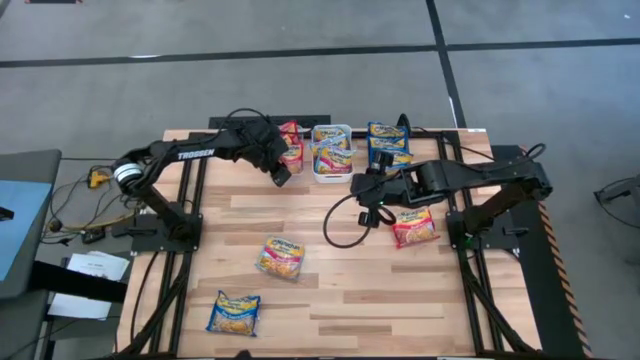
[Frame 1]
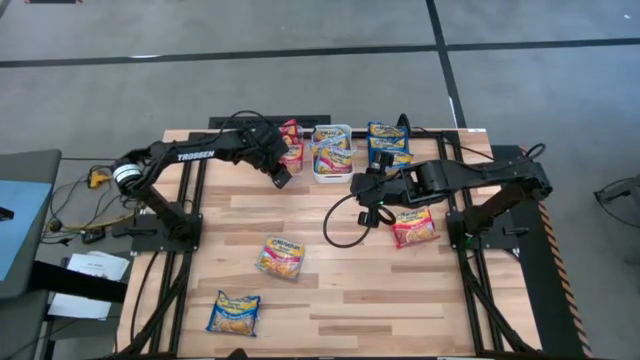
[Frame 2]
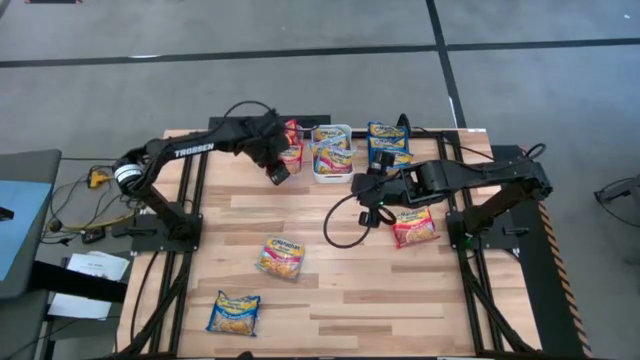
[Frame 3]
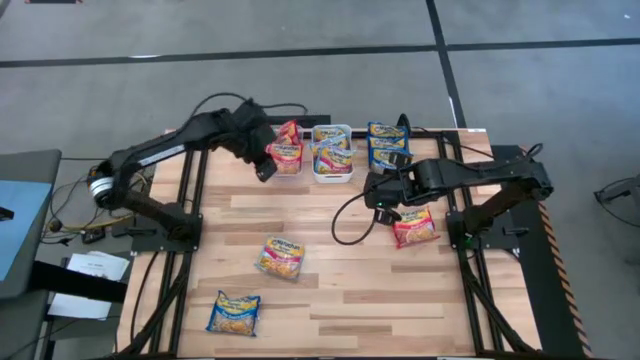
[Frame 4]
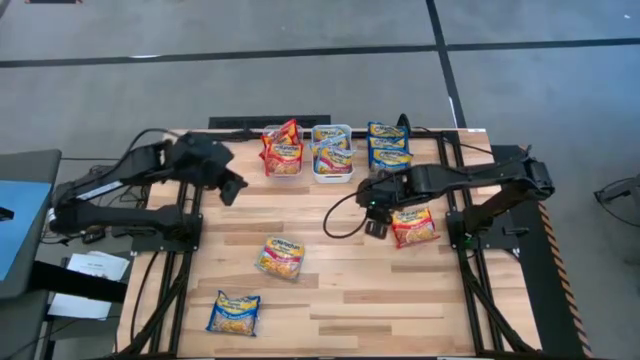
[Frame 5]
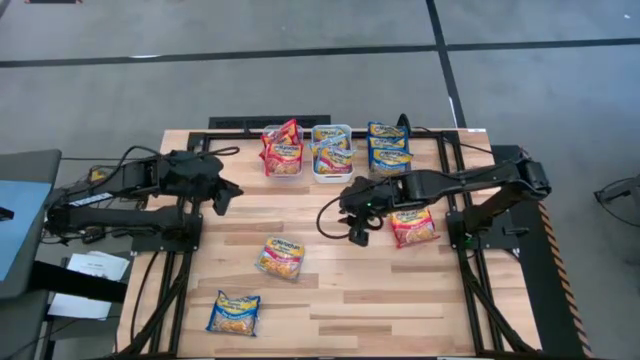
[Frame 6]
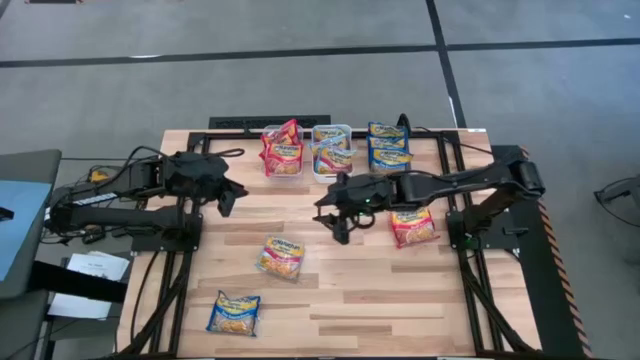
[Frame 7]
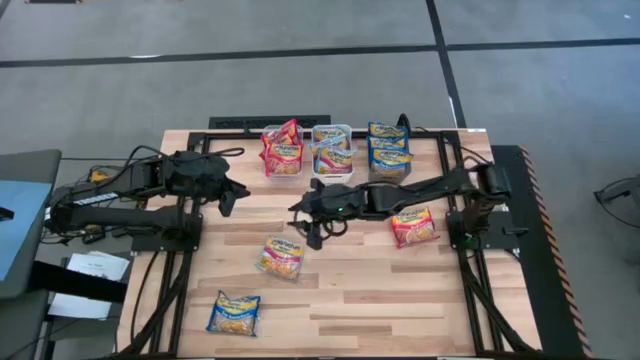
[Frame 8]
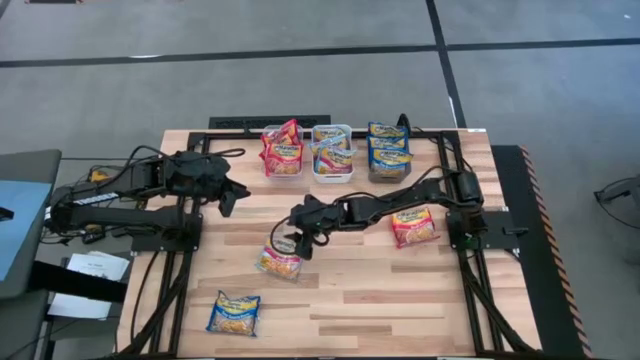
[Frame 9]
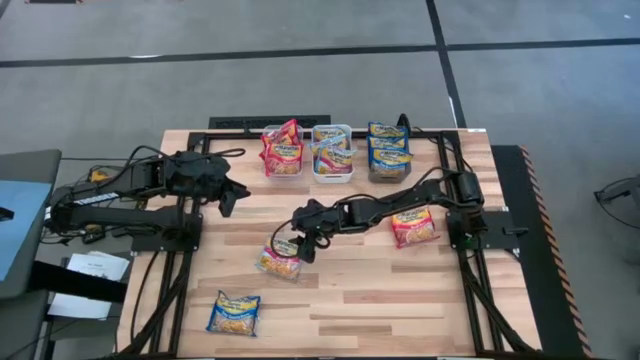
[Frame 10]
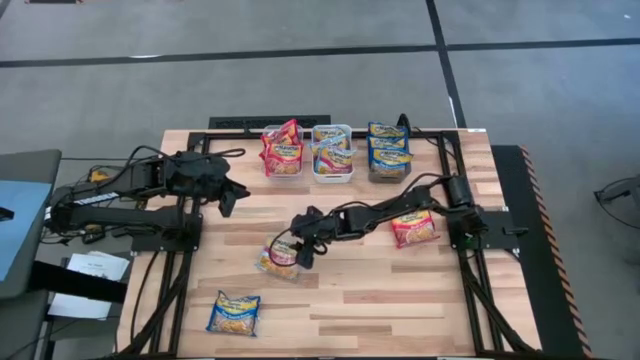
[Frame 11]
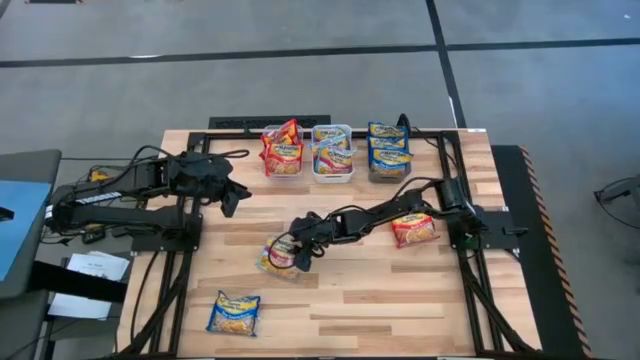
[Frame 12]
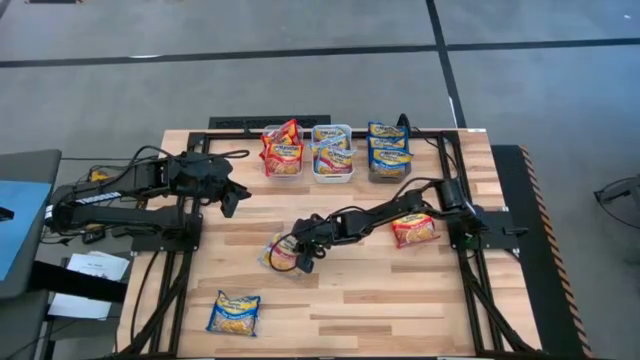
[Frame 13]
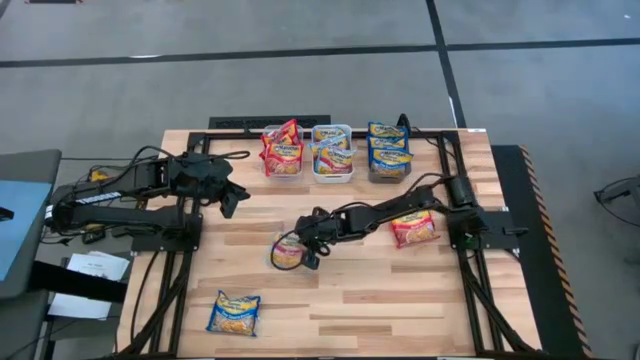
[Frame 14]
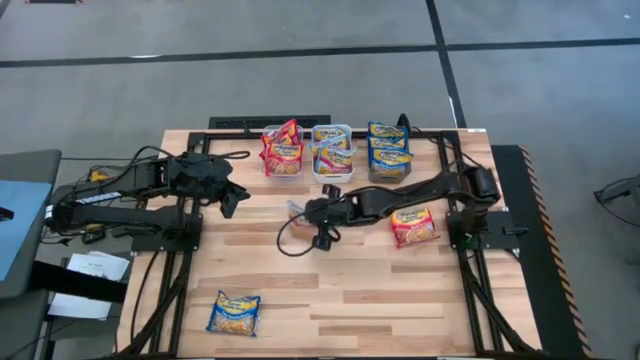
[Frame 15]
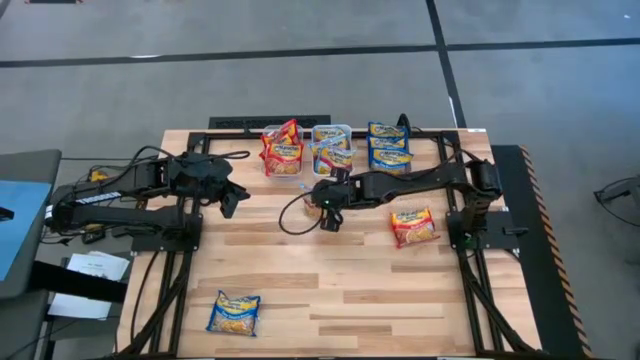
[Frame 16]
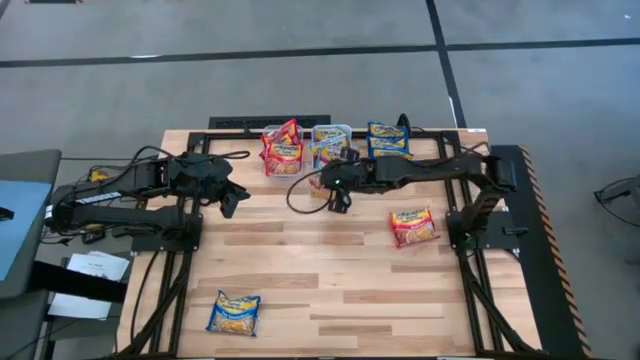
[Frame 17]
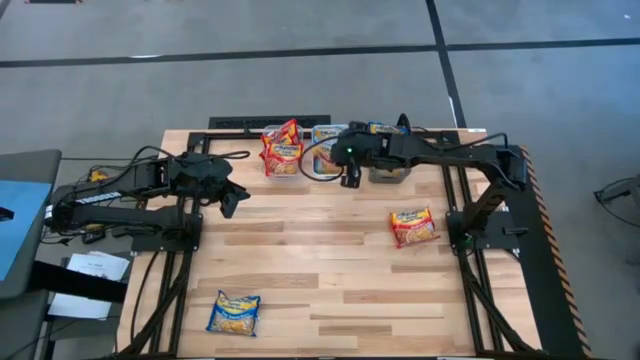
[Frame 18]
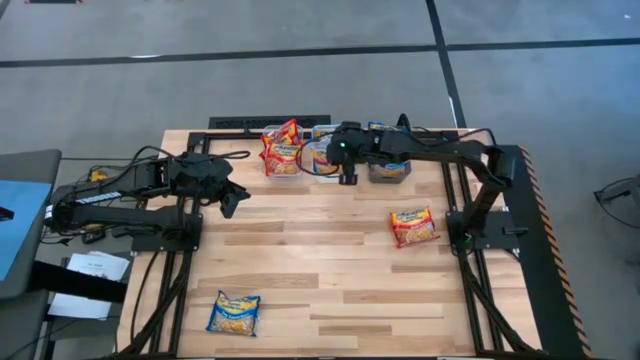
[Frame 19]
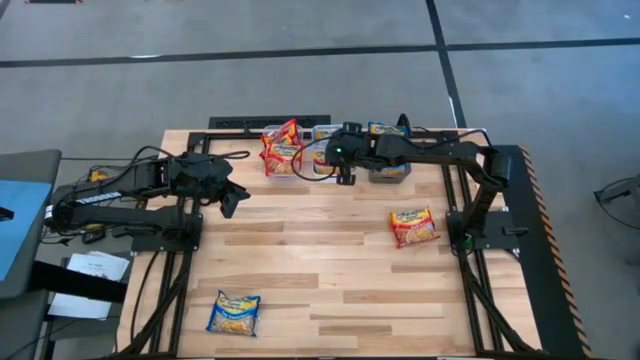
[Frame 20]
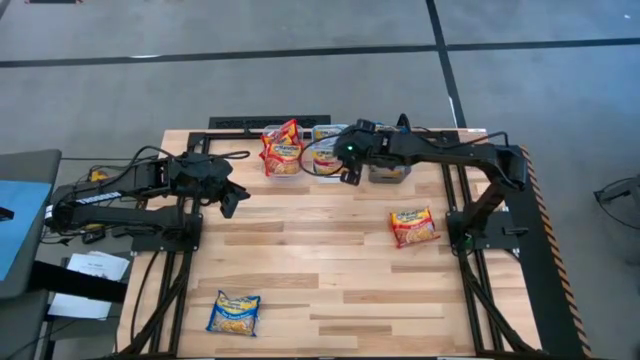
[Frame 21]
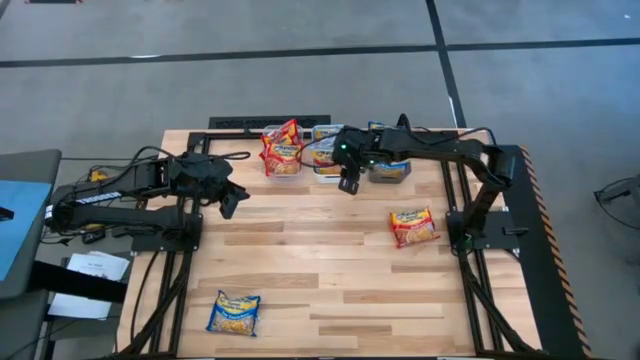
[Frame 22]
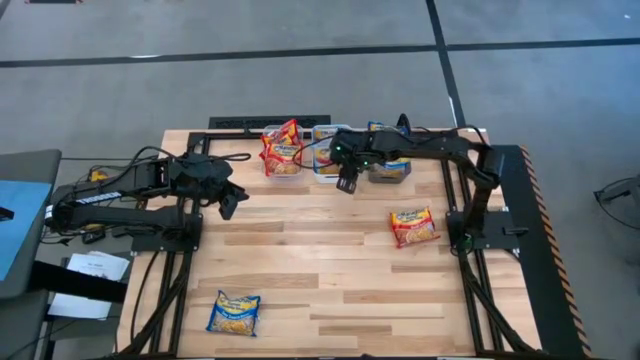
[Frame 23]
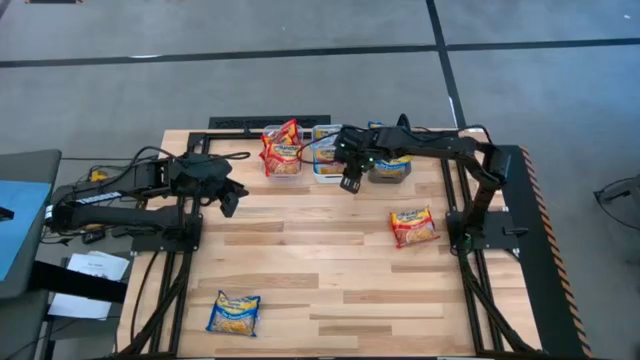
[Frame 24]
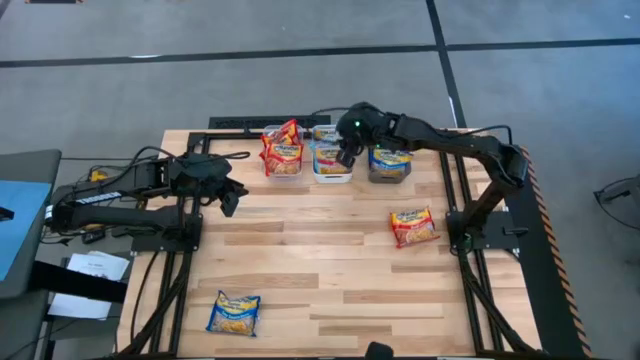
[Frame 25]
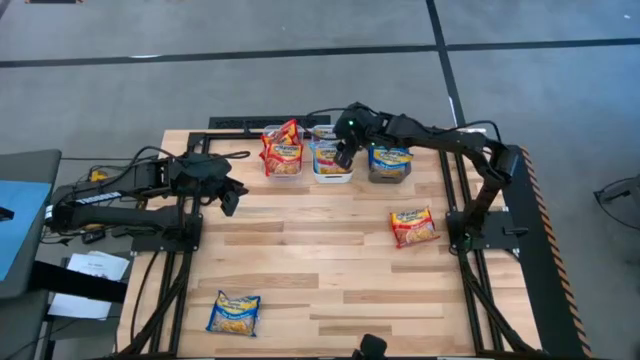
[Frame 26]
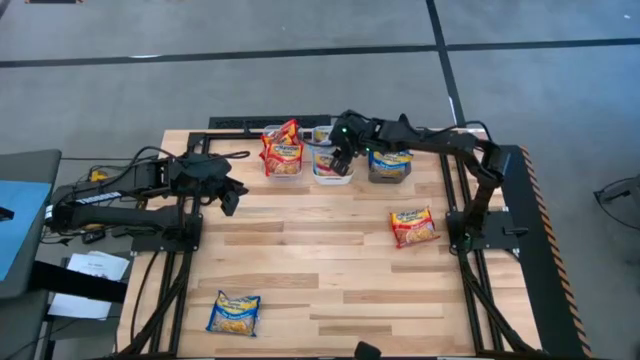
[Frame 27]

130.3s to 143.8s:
Task: Sort Maruchan noodles
Put the light blue noodle pack into the white bin

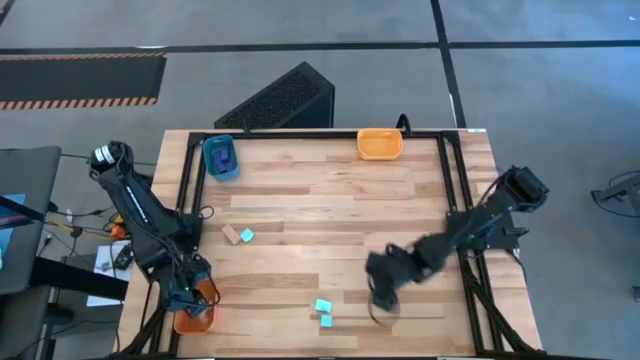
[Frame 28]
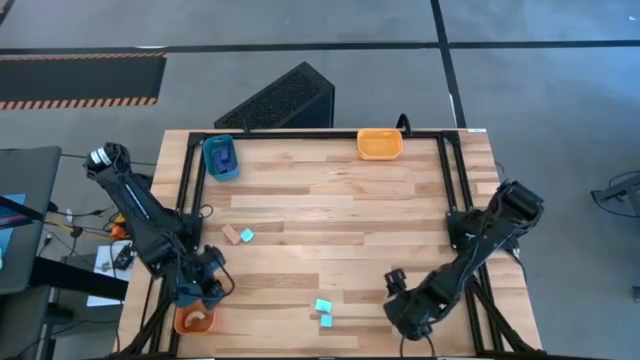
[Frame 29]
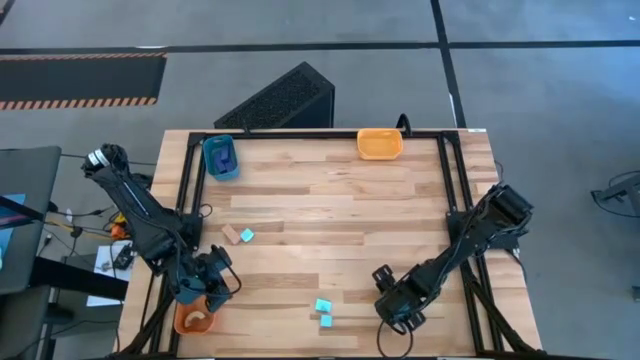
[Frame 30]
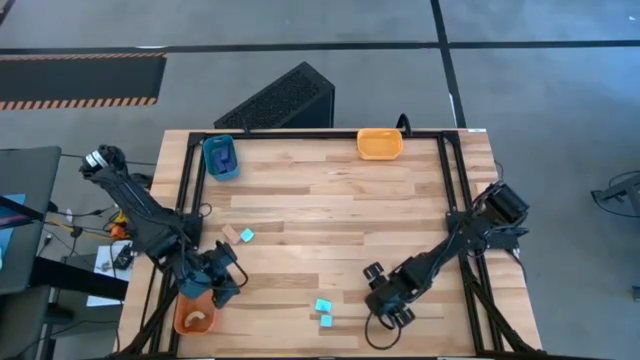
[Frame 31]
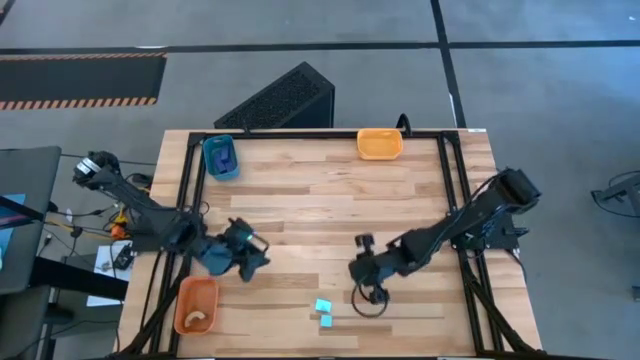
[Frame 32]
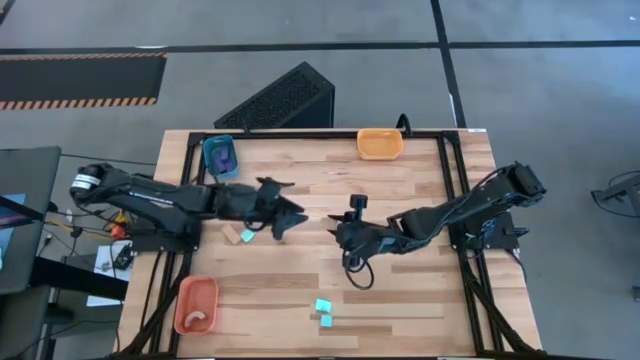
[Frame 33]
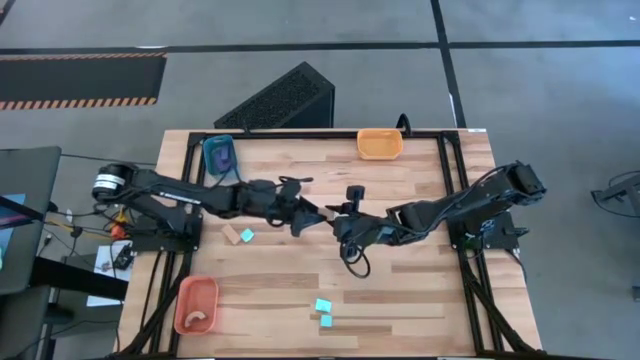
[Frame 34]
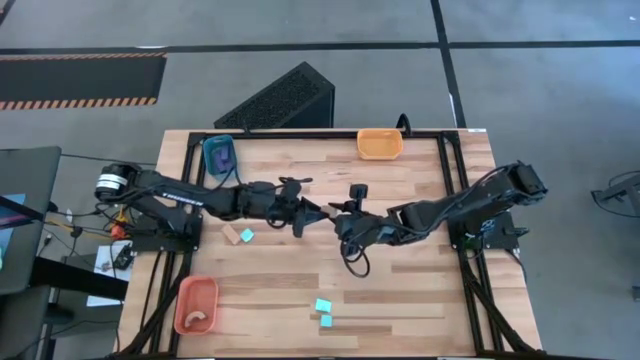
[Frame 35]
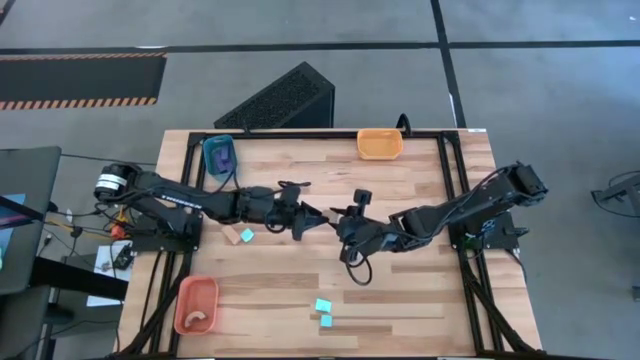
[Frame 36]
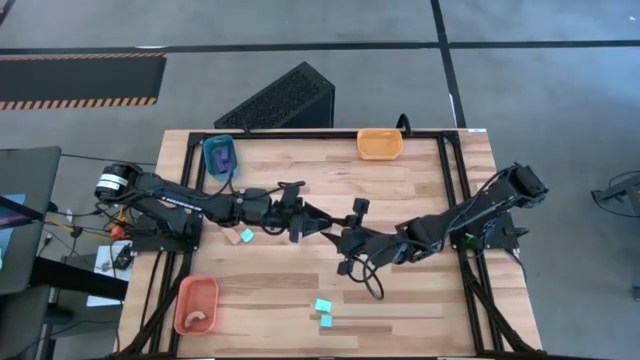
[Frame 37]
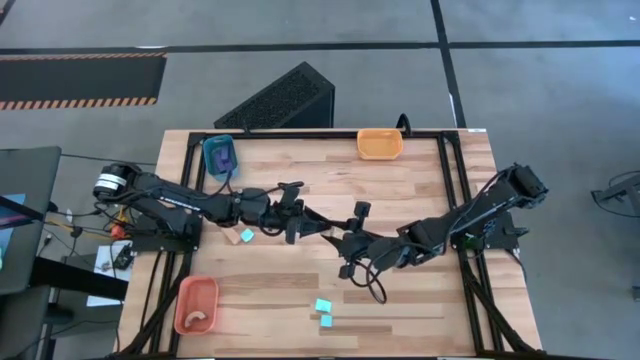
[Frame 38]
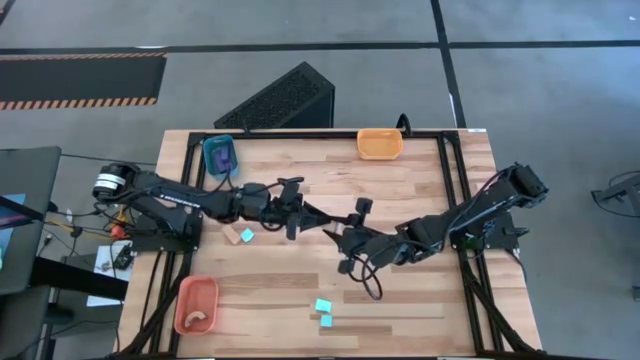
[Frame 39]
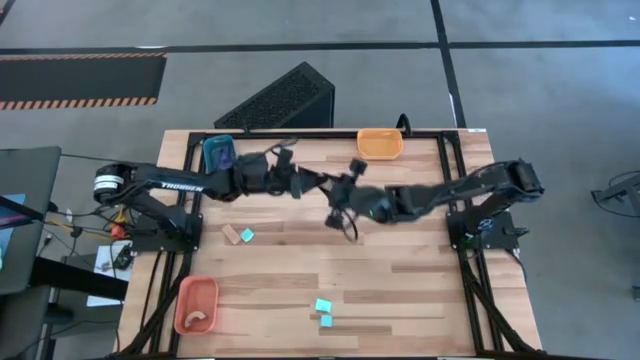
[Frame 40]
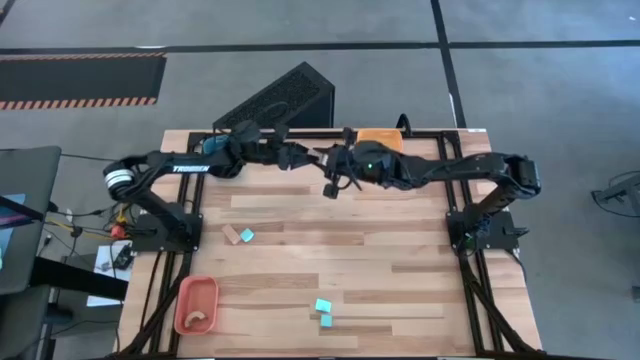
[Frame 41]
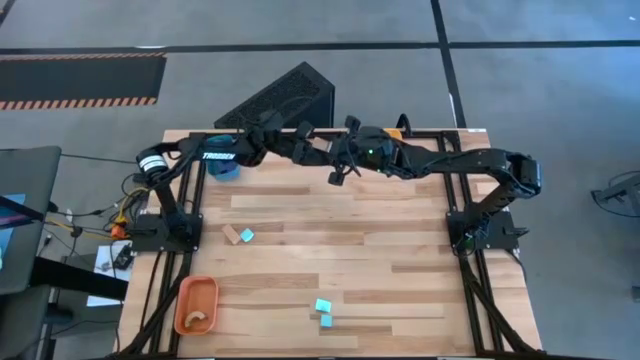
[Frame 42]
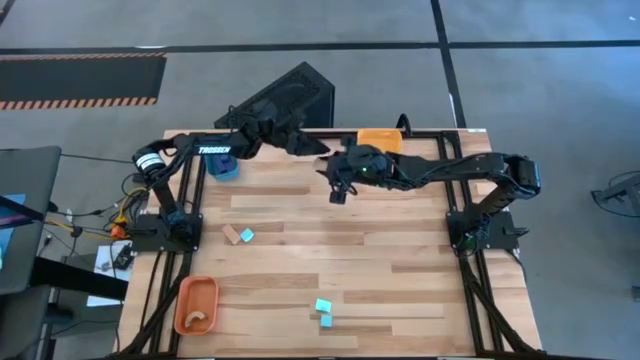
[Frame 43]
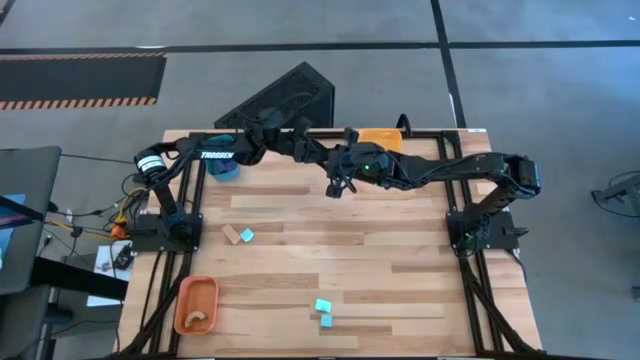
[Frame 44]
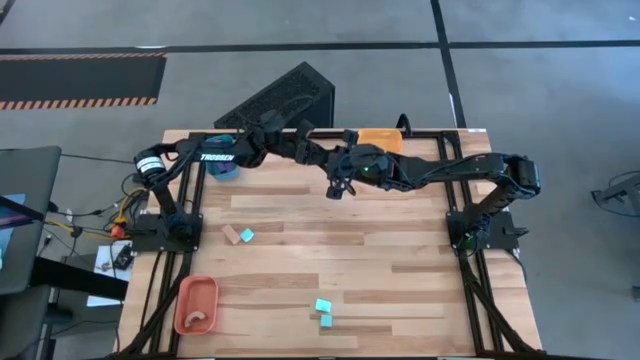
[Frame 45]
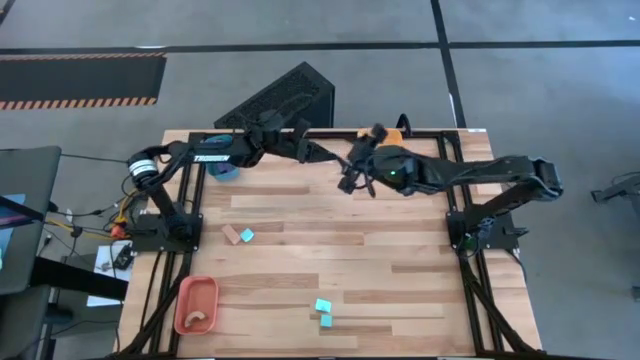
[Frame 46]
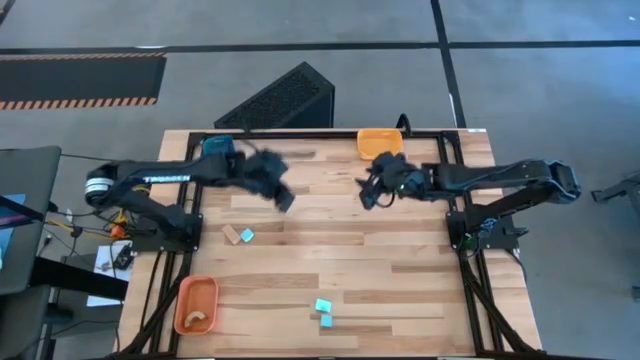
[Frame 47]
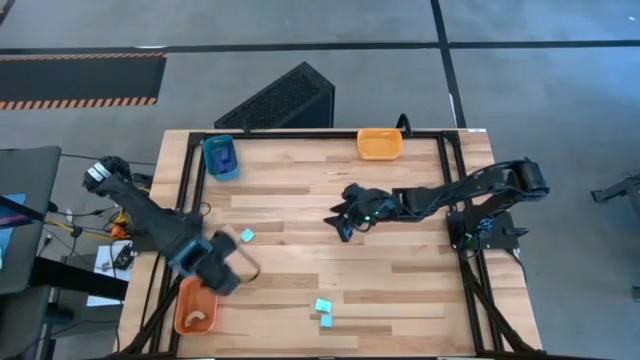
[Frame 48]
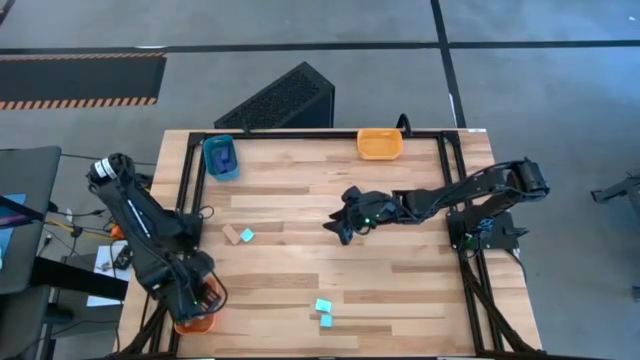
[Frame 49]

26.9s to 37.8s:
Task: Sort & place blocks by color
Put the bottom brown block into the orange bin
